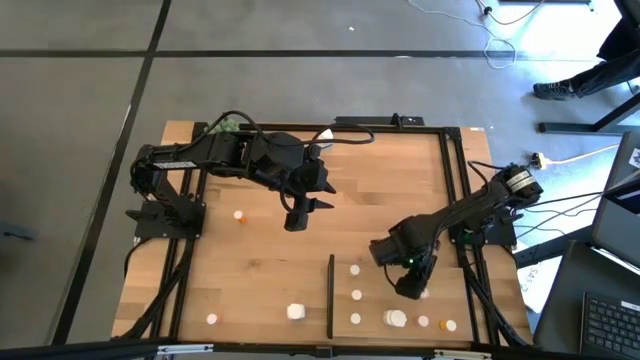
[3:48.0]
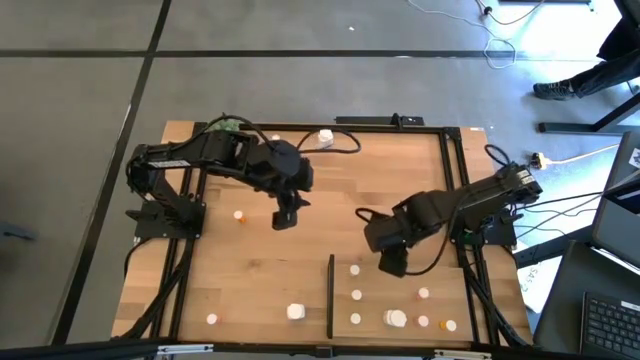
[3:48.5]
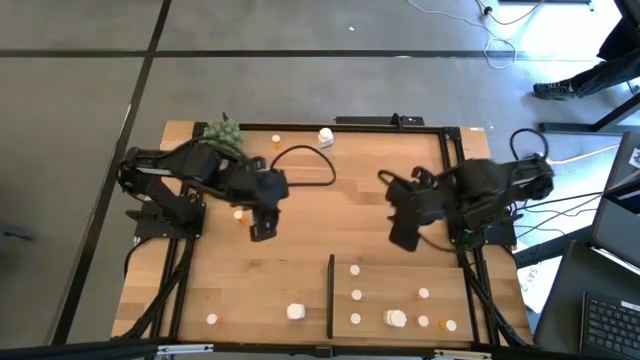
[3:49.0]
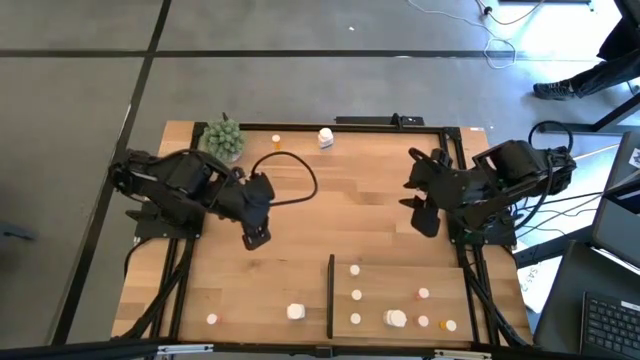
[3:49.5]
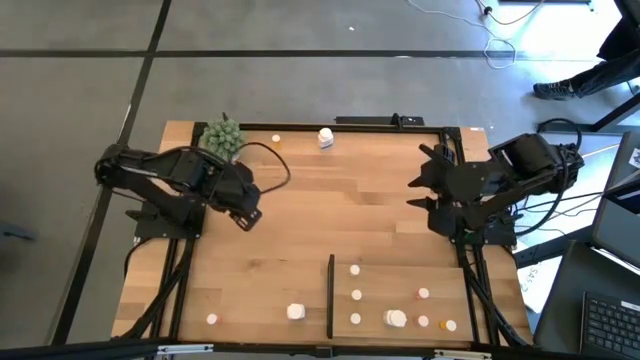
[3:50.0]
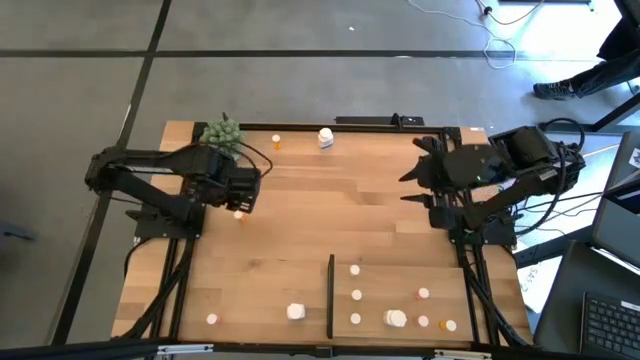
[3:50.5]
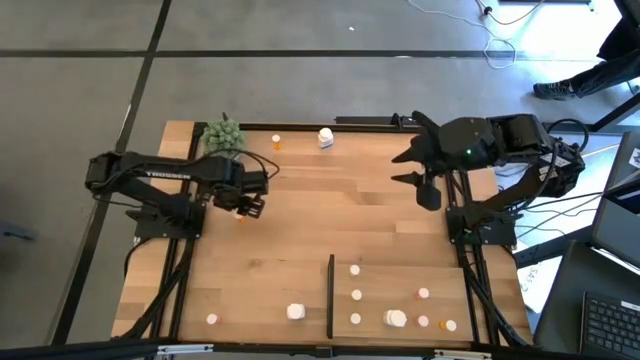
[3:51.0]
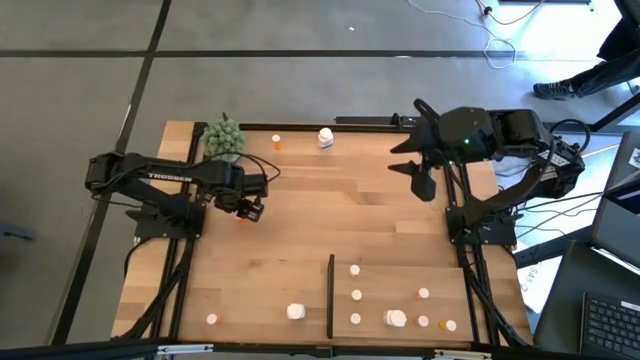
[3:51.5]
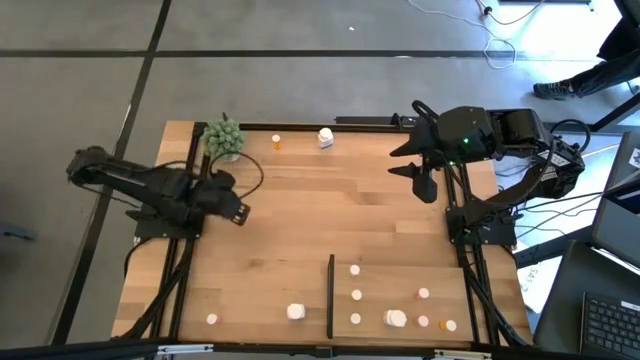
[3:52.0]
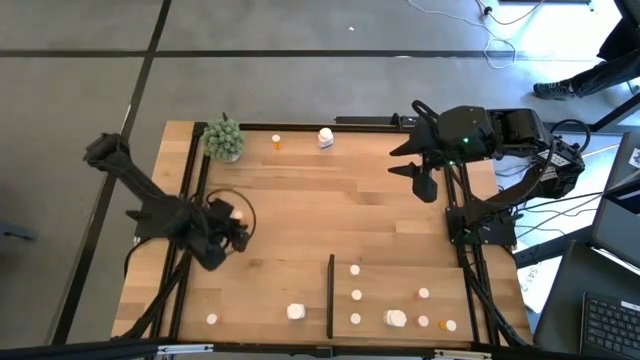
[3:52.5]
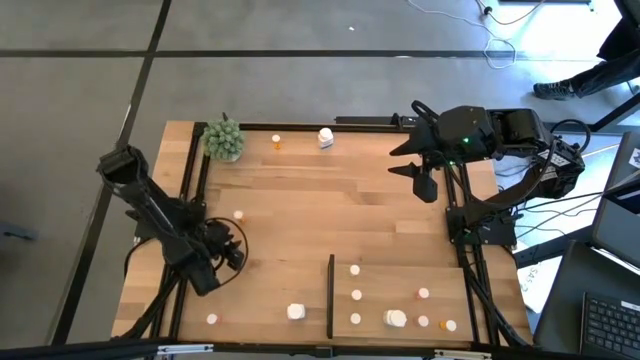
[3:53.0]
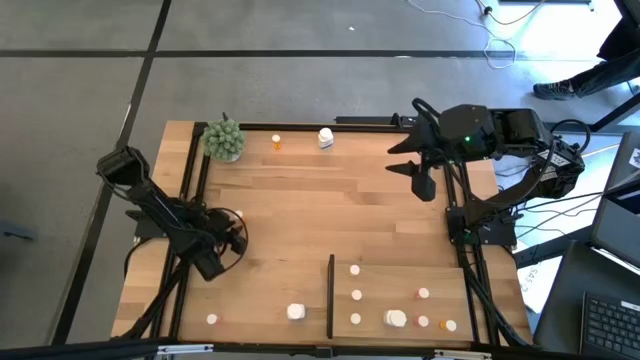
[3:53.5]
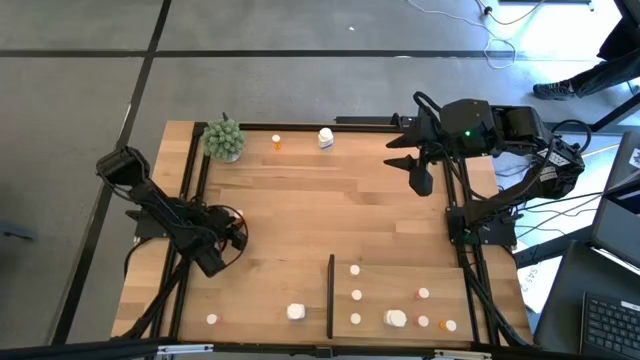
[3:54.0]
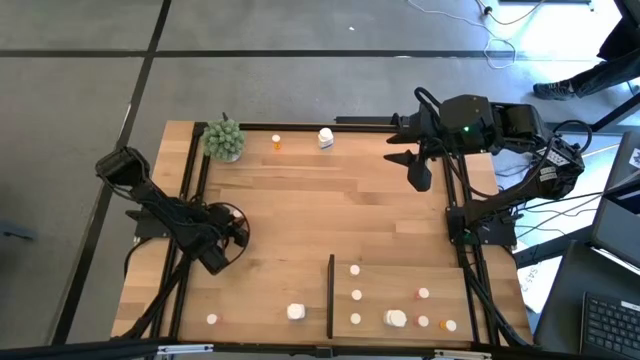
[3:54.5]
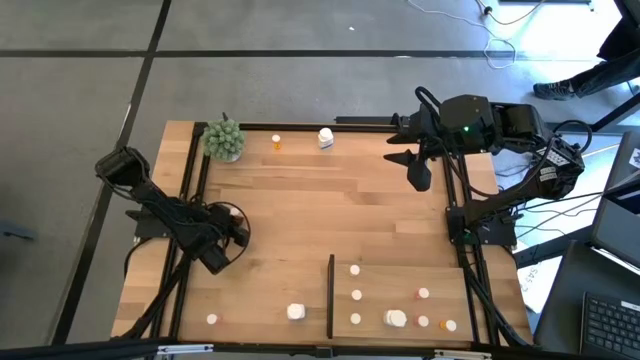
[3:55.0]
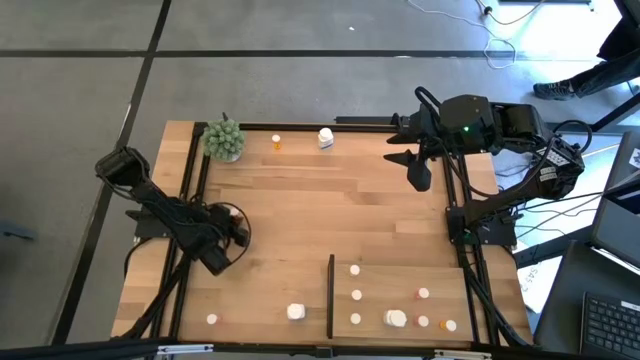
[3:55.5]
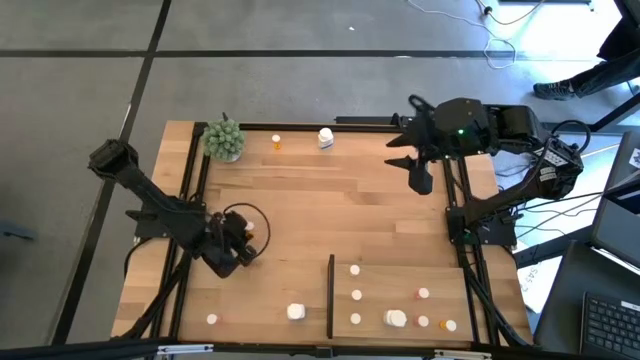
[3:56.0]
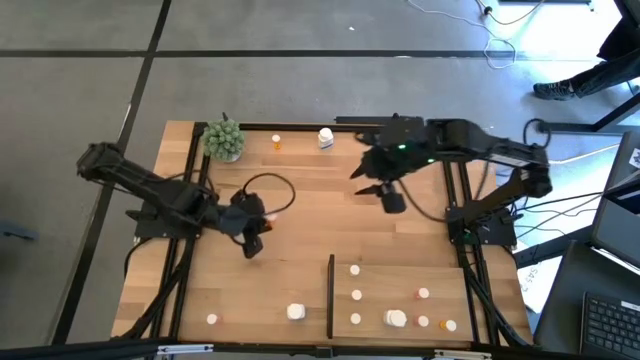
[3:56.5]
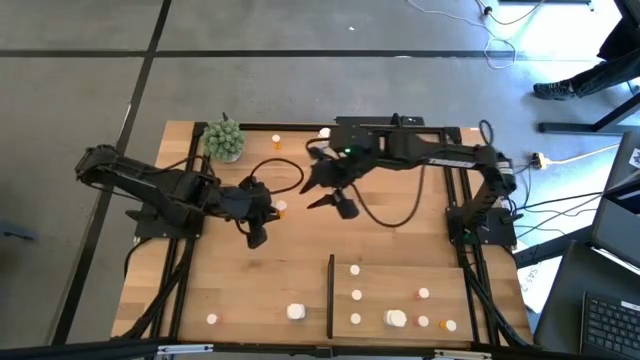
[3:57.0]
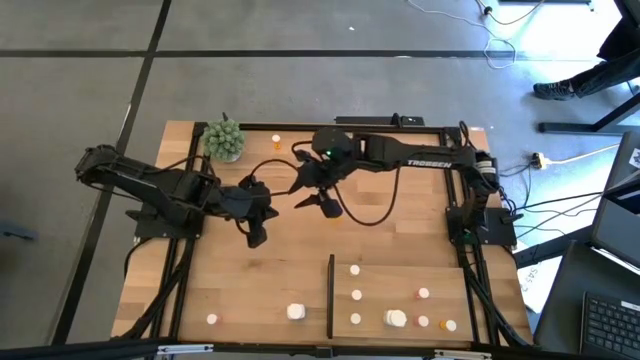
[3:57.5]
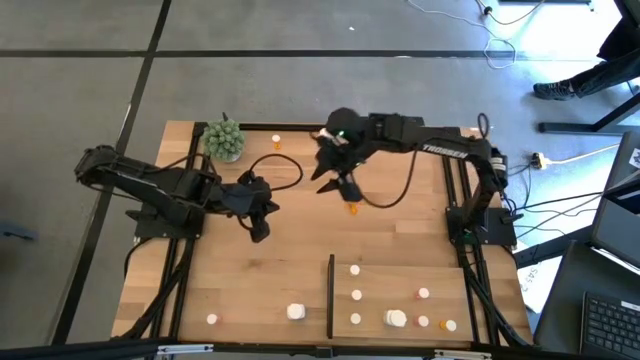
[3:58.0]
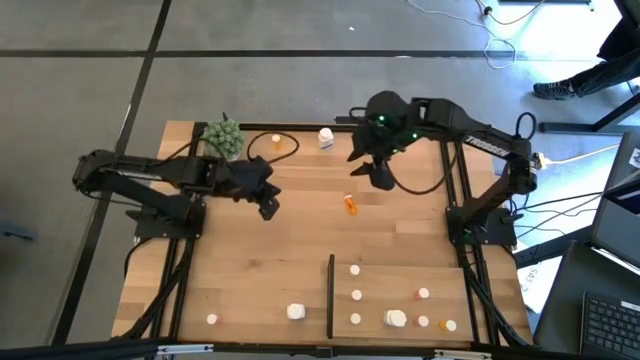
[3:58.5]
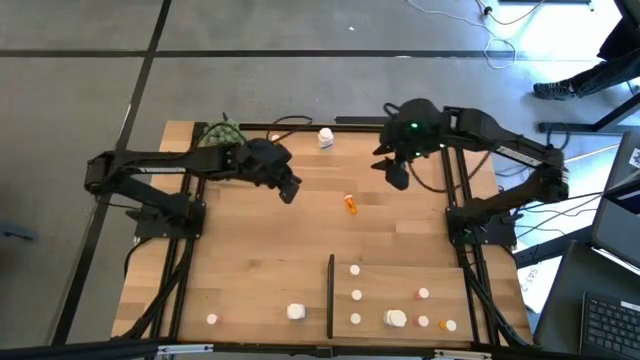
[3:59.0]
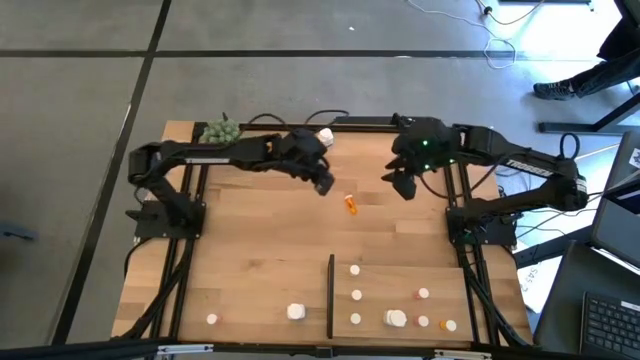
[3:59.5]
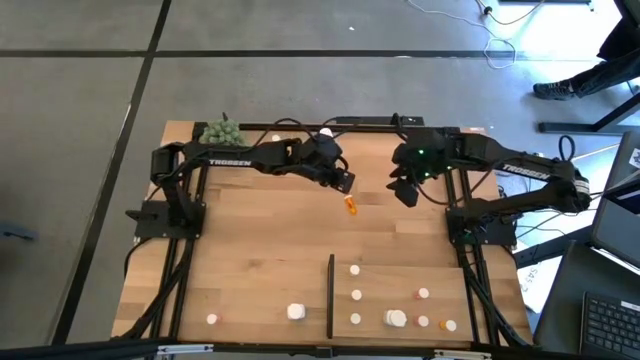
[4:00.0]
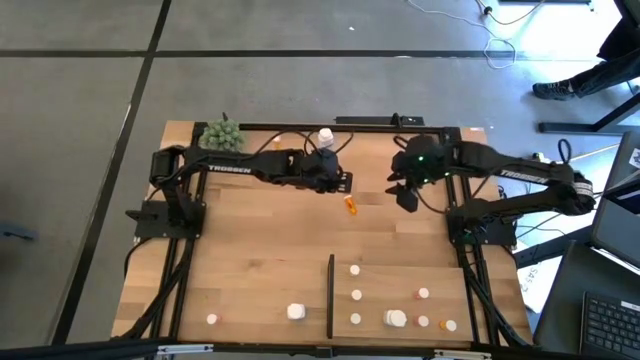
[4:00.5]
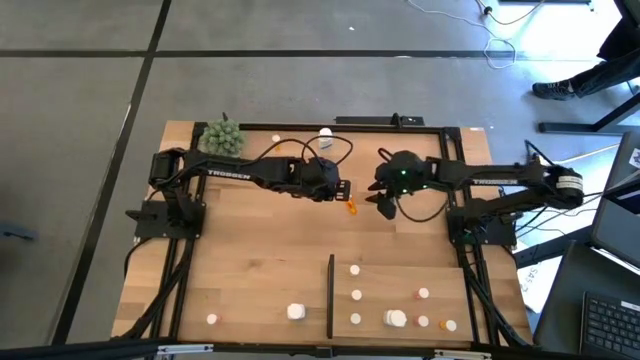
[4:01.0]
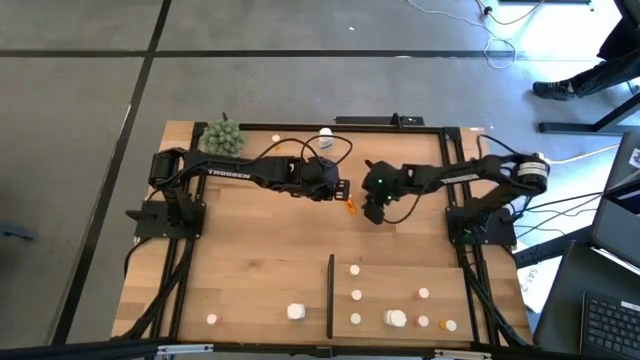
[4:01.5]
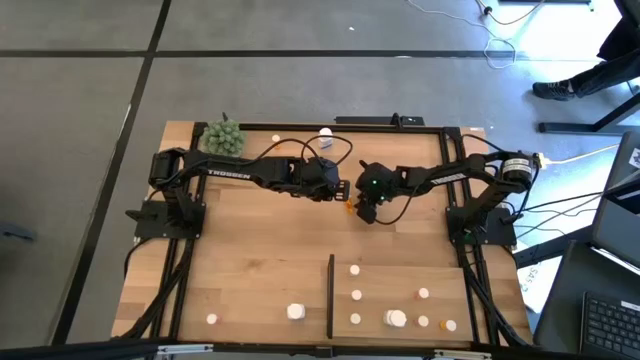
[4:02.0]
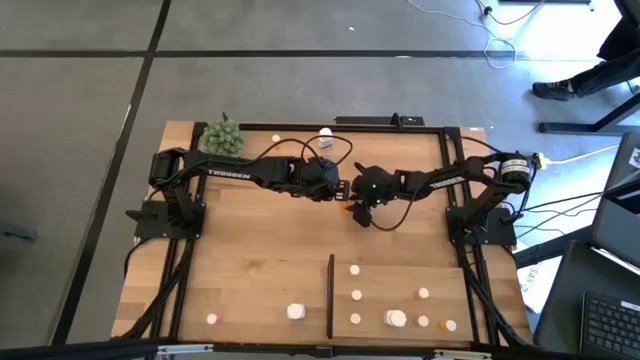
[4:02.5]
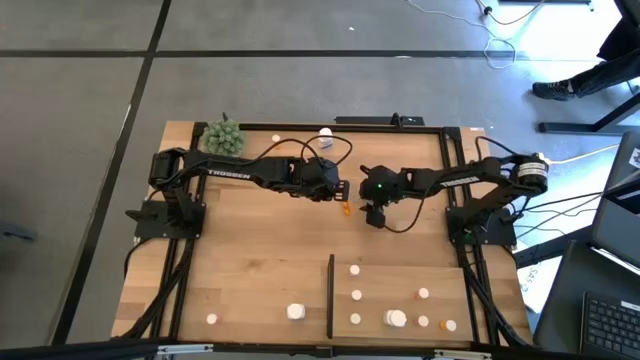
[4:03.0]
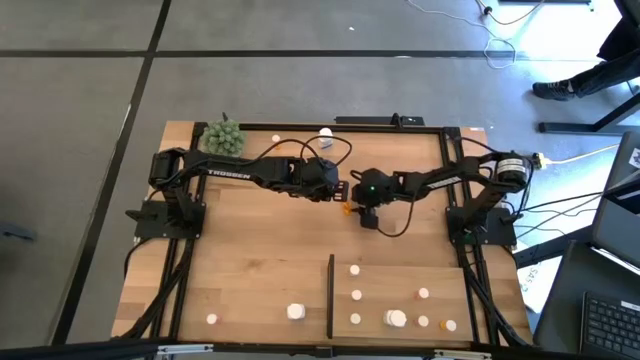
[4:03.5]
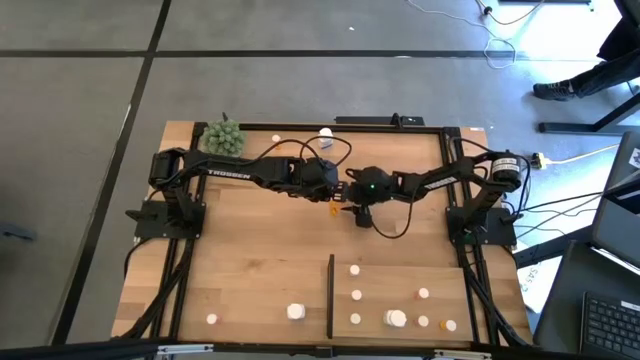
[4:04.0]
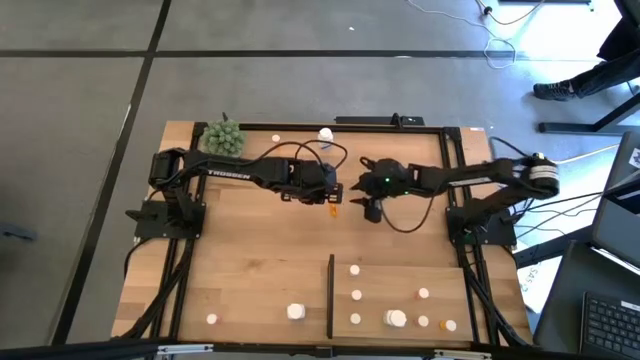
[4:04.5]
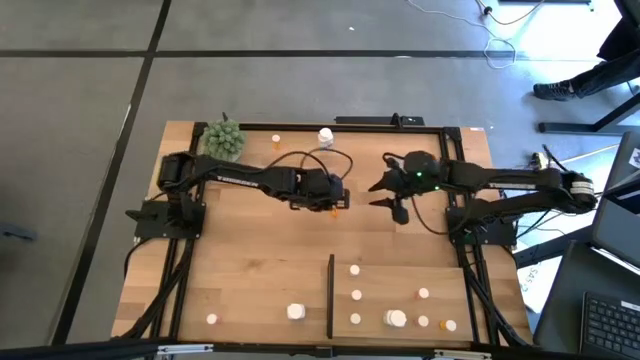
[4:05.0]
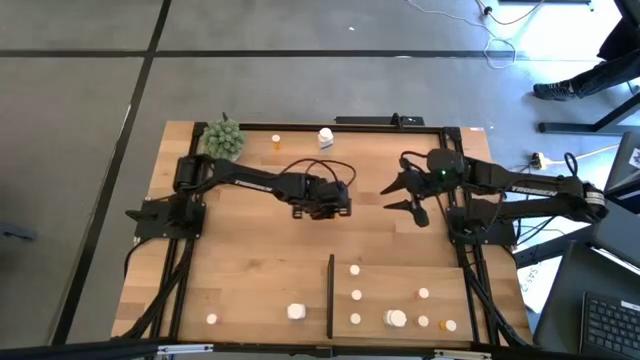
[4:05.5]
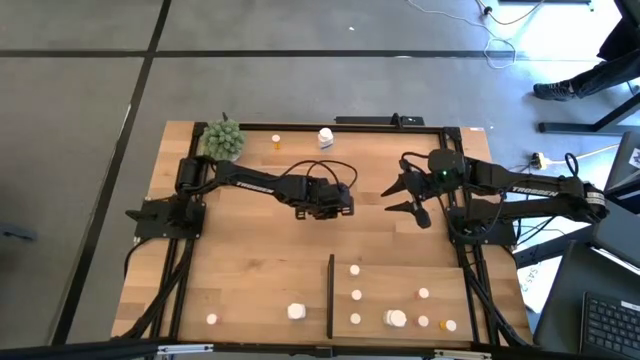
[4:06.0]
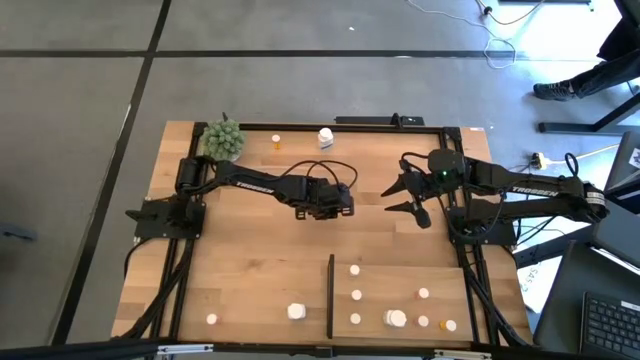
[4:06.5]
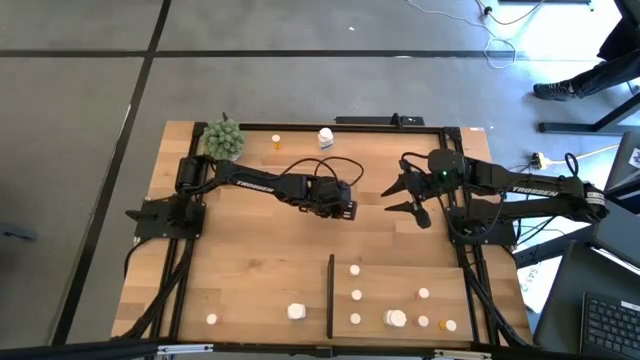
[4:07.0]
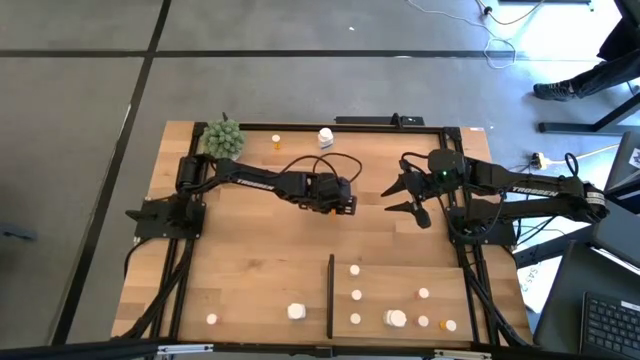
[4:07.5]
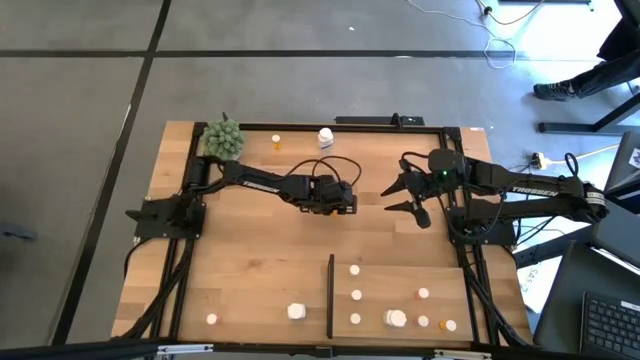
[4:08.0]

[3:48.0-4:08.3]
Task: Pick and place medicine bottles onto shelf by color
Put the bottom orange pill bottle on the shelf aligned with the other orange pill bottle

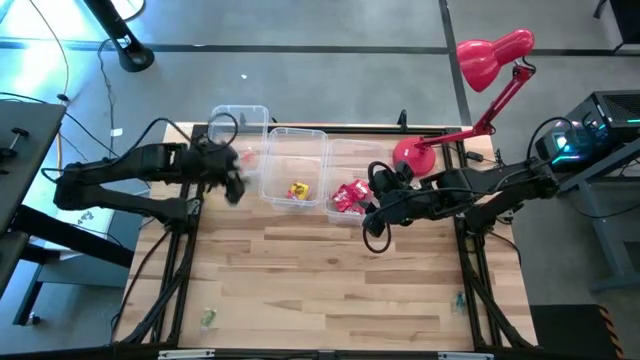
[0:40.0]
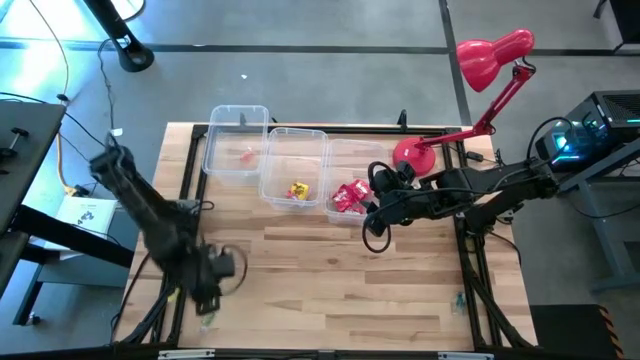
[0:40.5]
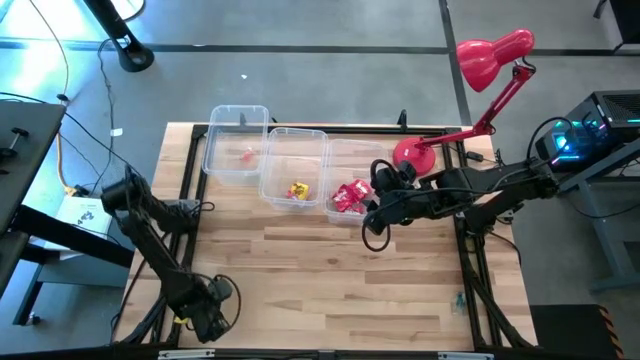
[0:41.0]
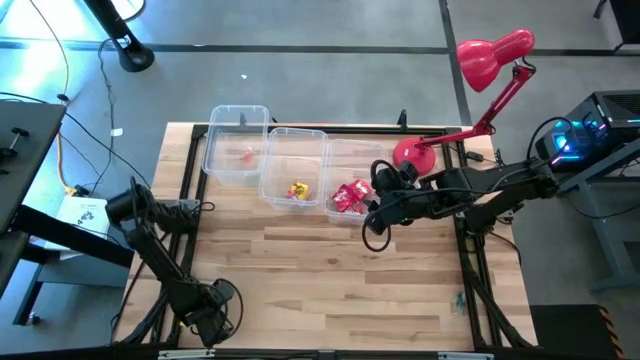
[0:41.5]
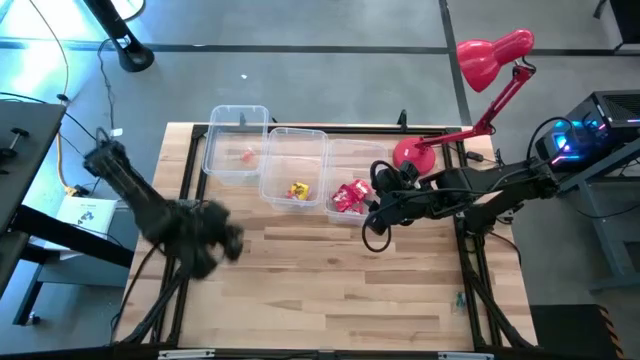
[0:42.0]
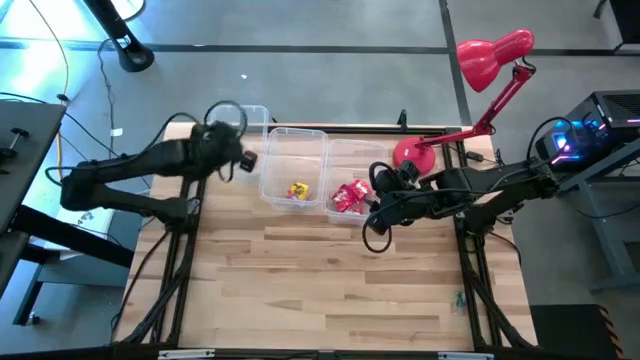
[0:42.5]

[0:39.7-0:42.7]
Task: Sort candy
Put the bottom green gummy into the left transparent bin
